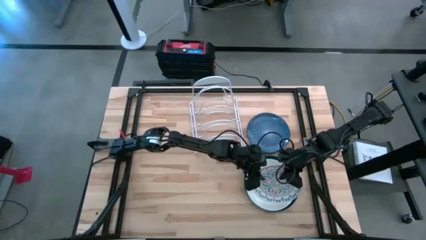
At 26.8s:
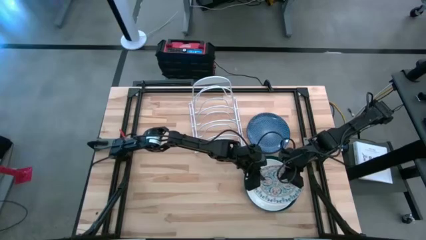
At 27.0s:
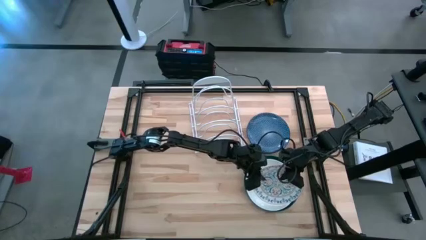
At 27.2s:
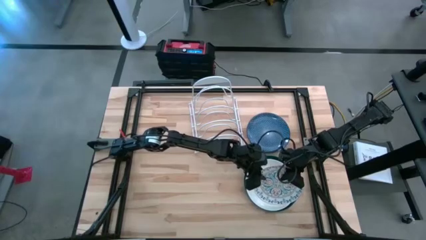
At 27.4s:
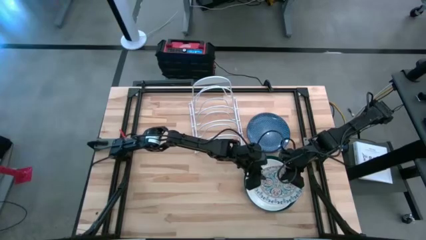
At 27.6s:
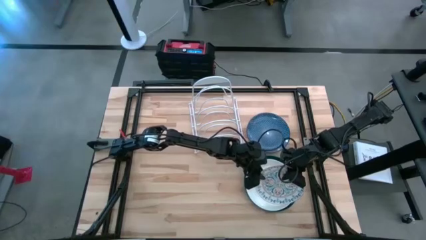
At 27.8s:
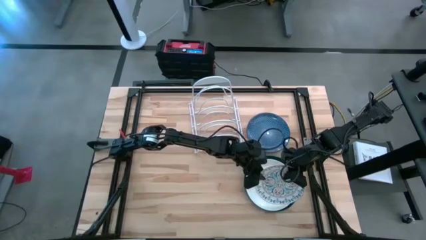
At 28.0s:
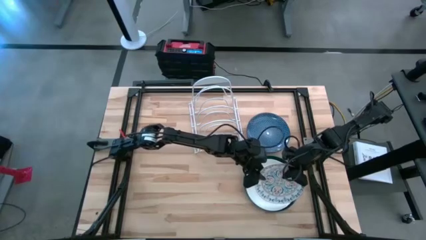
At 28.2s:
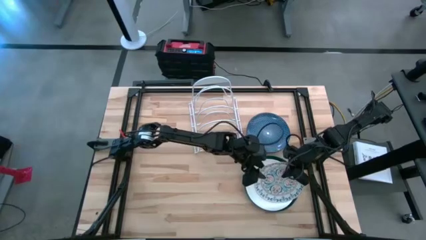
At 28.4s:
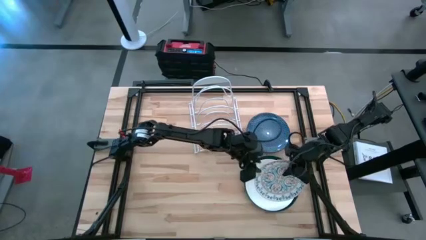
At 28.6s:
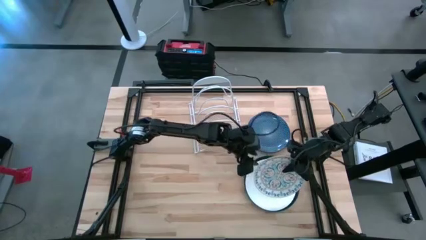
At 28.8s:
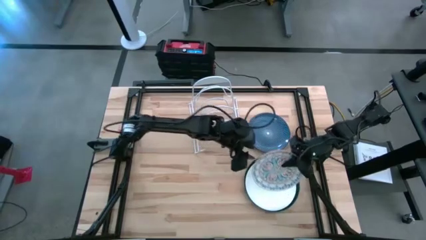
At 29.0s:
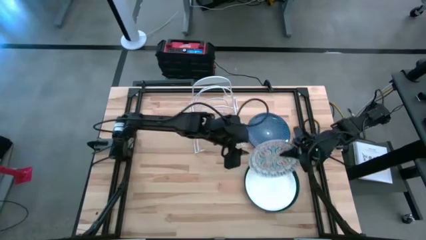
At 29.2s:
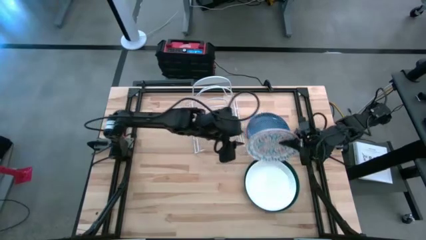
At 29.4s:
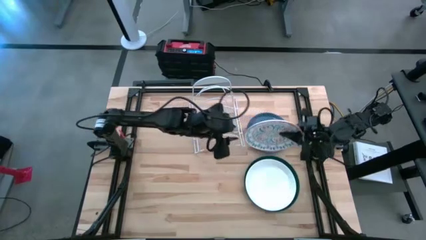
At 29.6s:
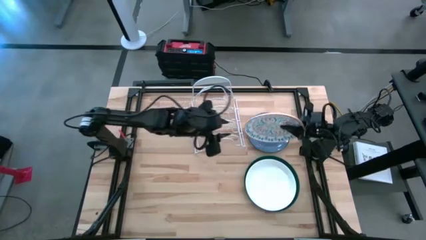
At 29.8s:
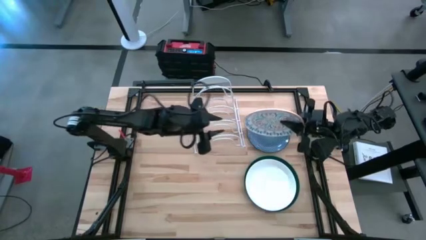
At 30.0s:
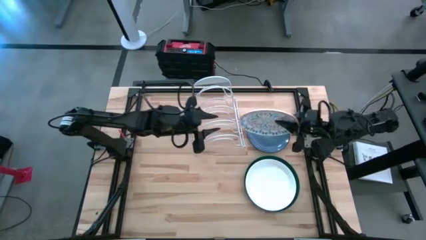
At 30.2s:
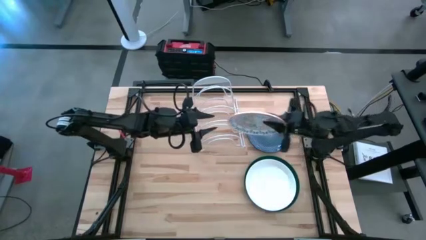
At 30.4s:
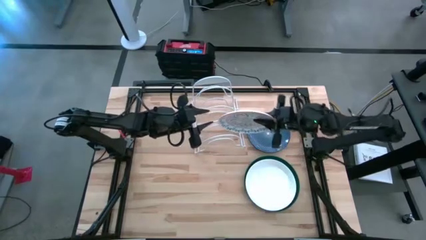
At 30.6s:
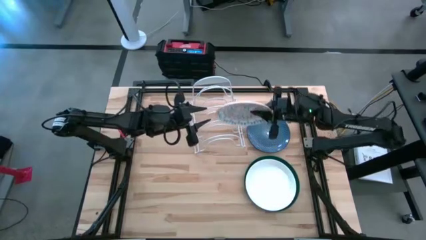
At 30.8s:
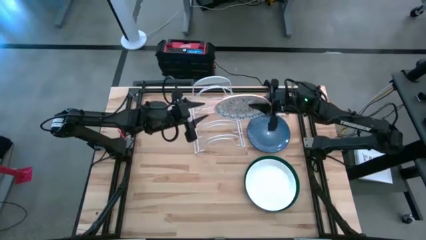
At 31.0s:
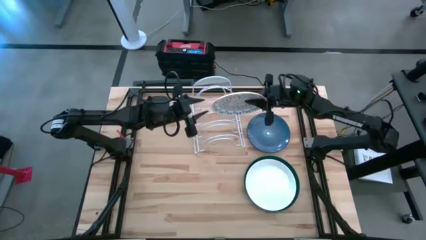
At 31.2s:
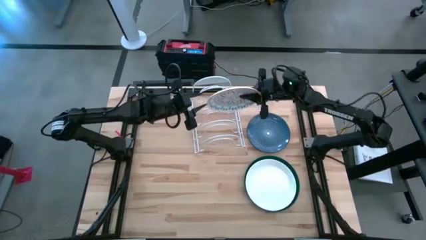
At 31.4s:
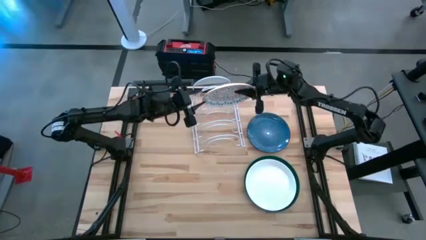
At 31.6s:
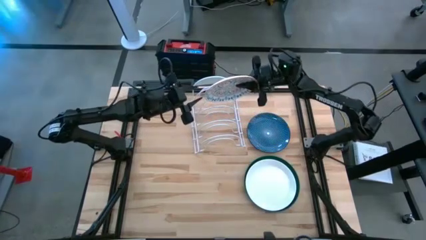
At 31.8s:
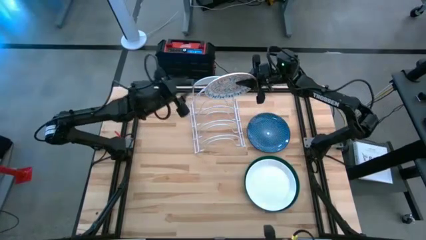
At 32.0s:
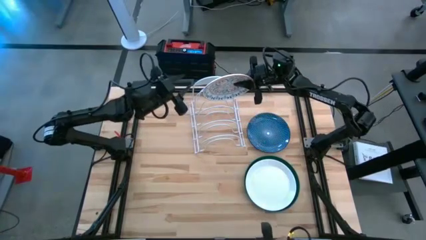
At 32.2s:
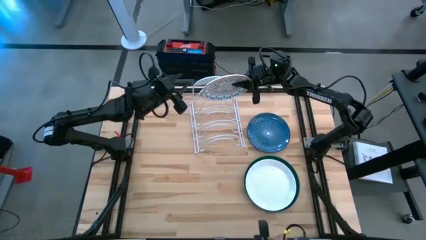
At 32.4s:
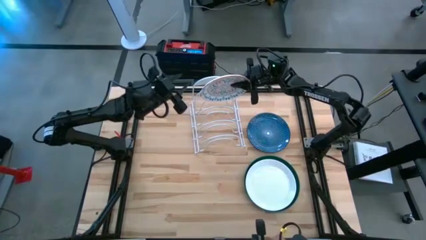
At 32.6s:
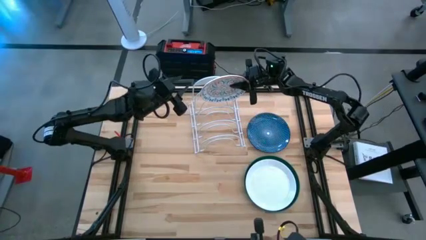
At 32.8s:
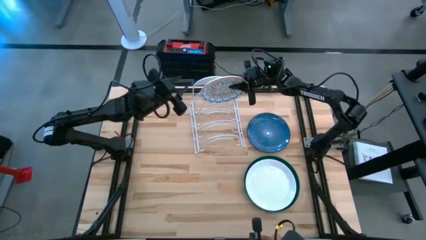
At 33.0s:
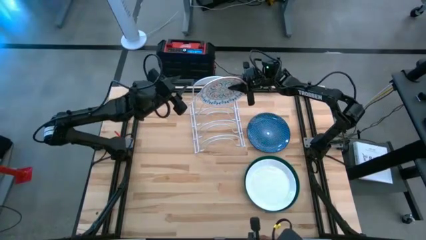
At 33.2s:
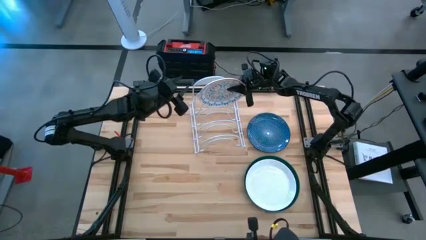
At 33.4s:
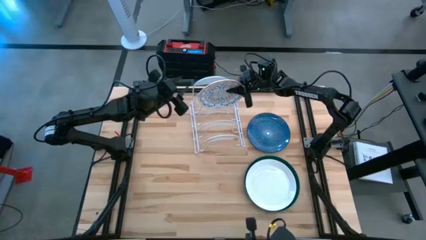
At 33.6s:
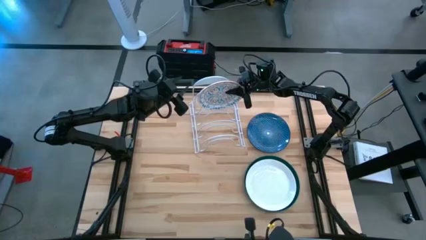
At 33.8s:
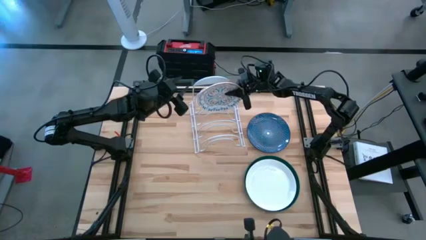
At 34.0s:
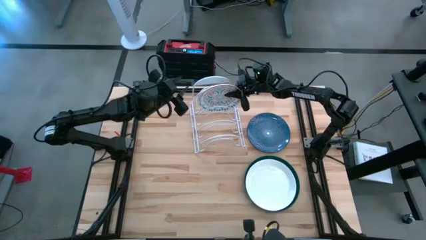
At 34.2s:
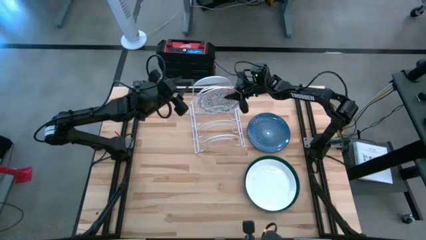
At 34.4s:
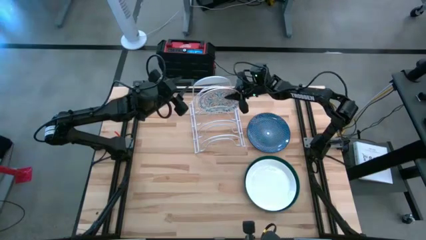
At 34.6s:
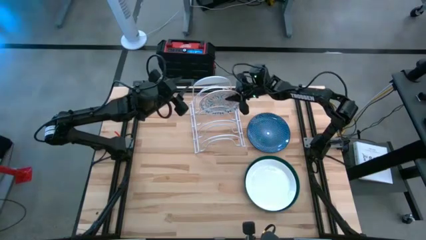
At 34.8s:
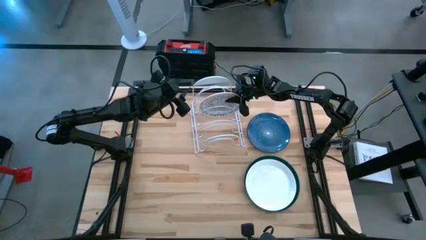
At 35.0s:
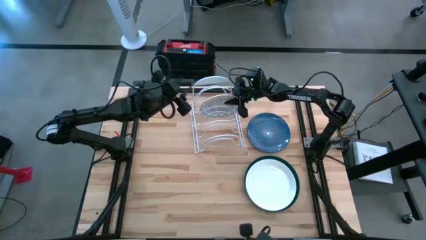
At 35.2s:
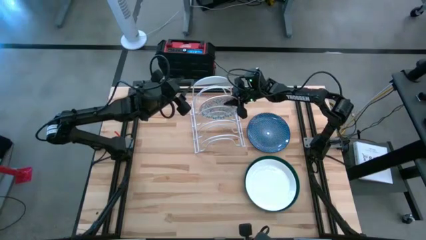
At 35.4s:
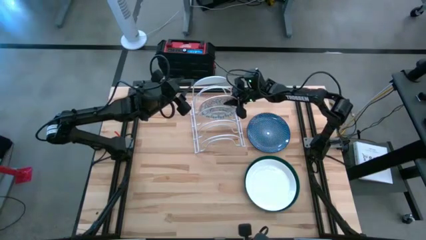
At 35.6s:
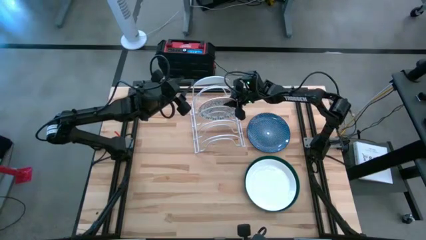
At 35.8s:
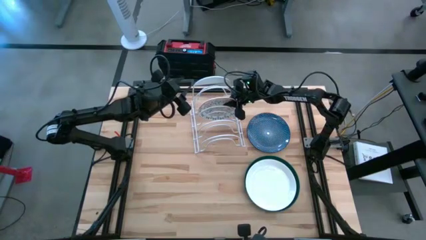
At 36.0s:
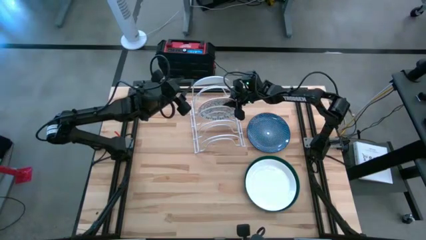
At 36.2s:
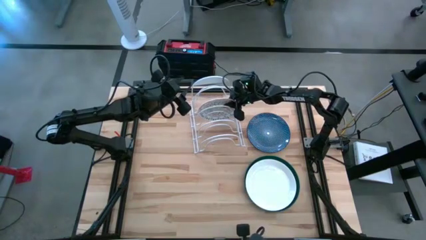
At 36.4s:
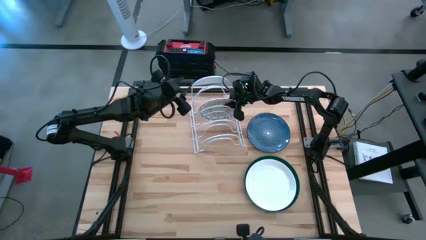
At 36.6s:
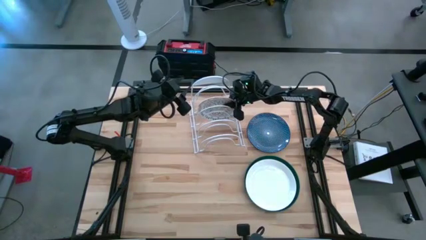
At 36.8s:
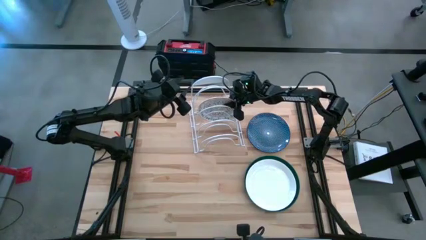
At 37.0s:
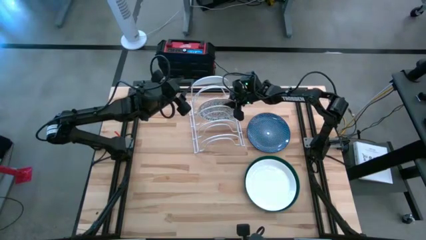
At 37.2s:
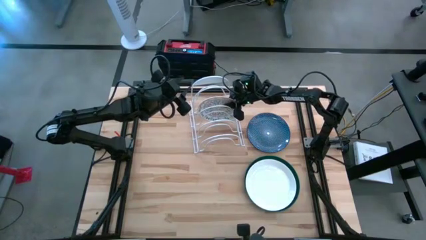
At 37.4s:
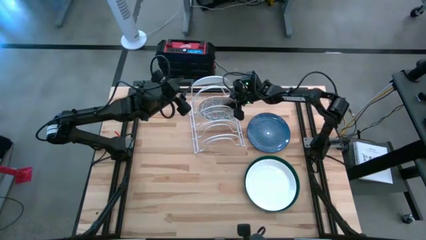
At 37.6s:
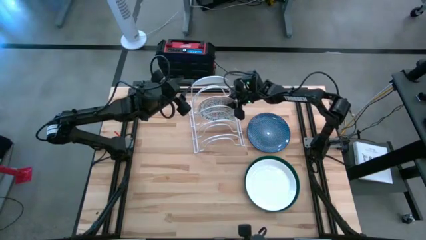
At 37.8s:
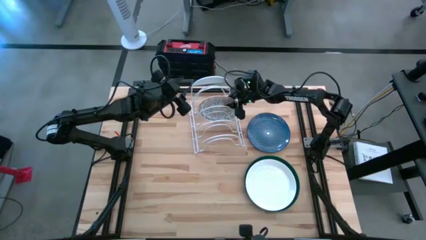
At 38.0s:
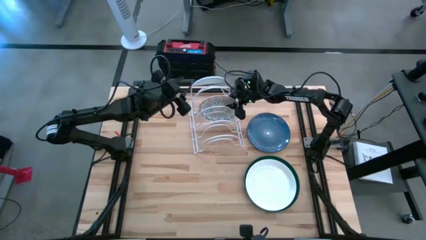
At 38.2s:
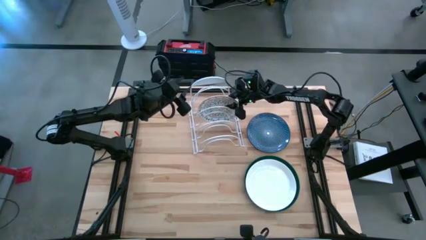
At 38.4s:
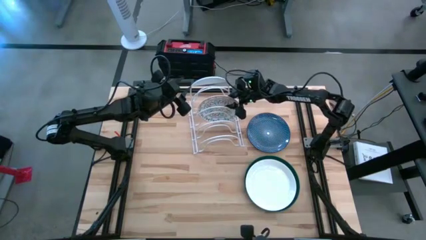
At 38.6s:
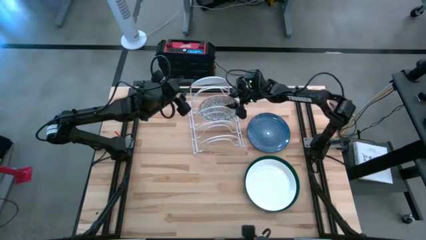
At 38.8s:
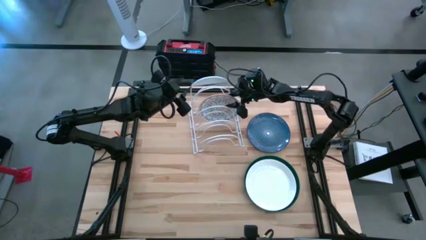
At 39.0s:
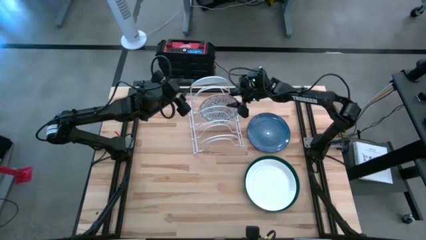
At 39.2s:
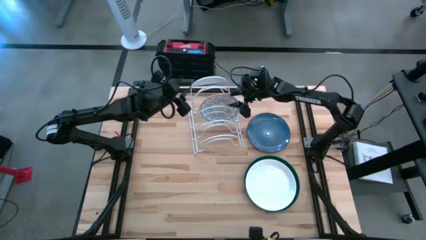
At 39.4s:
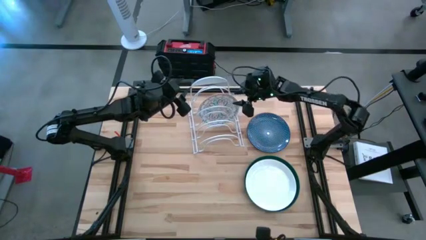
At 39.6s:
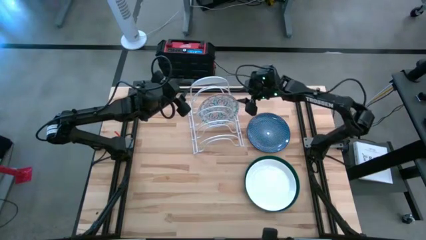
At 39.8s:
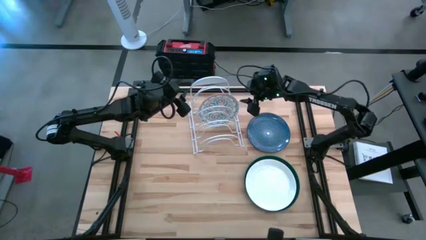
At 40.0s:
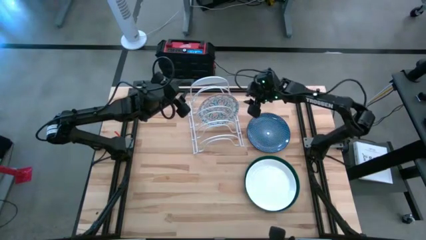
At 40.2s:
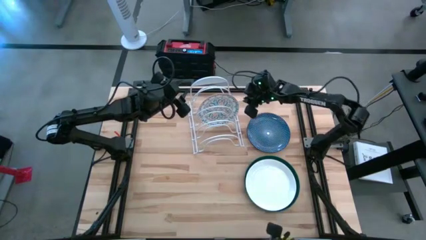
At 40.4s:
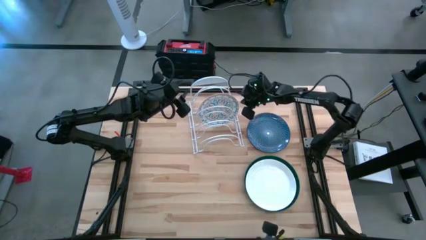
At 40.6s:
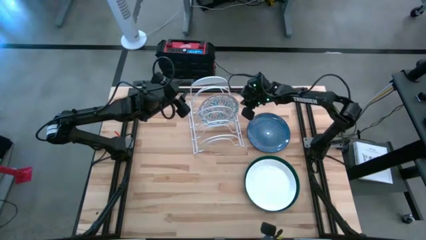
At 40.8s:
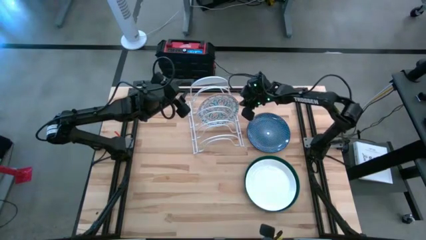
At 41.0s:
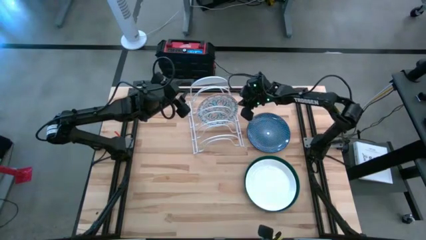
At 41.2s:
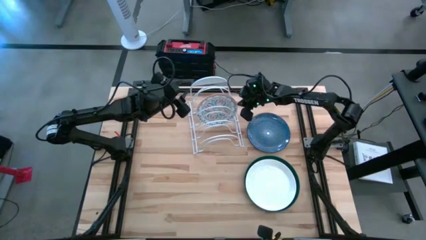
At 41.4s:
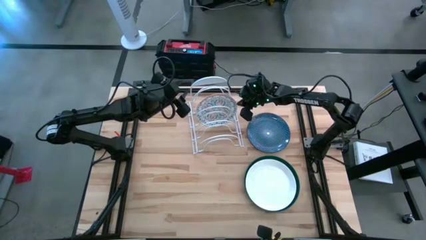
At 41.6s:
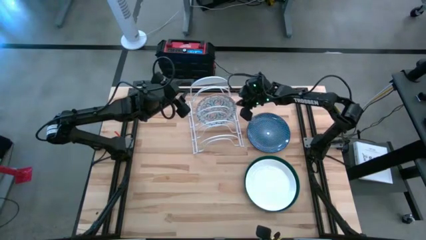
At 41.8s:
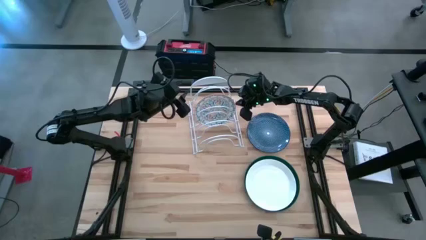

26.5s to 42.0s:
Task: Sort dishes
Put the white patterned plate into the dish rack

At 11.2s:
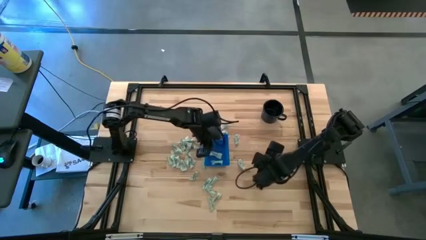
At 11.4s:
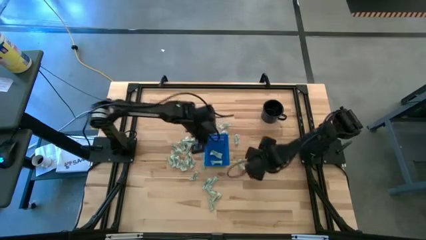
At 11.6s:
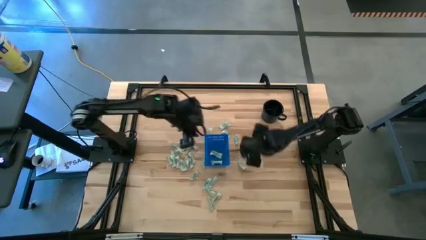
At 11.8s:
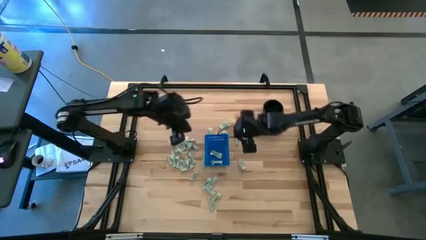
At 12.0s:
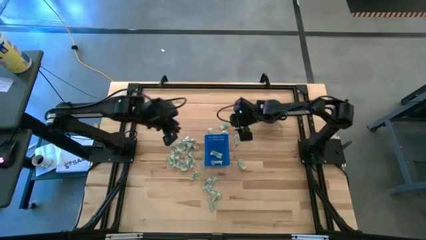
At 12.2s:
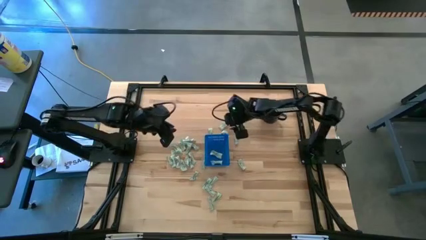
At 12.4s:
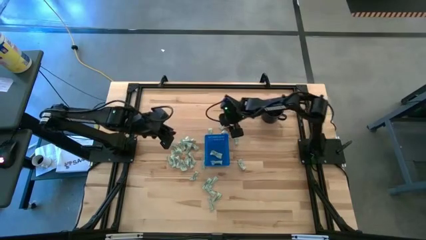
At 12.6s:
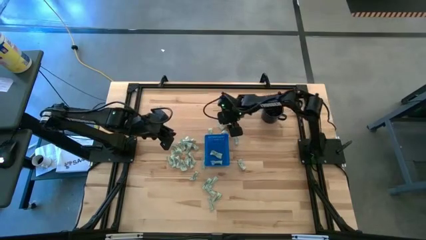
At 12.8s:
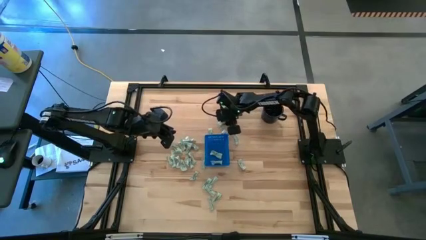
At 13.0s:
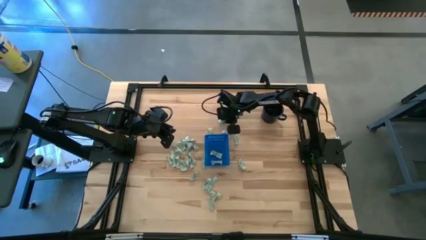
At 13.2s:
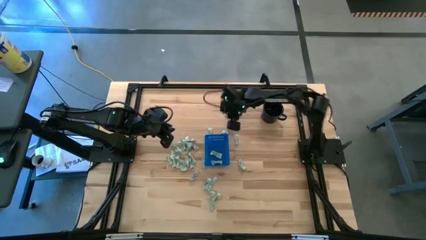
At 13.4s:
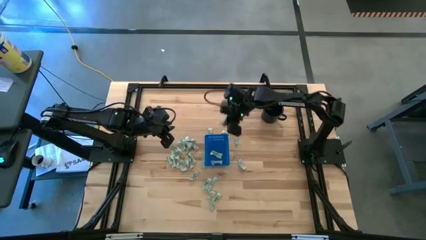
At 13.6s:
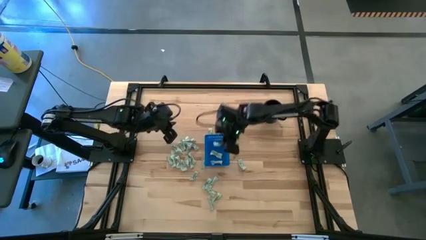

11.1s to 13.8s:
Task: Pick and place Stevia / Truvia into bins
Put the stevia packet into the basket
